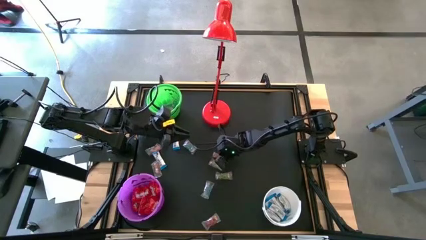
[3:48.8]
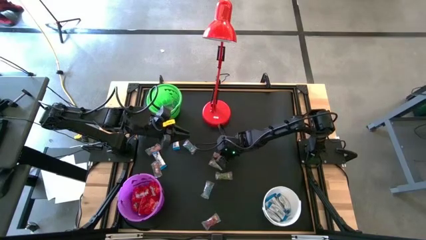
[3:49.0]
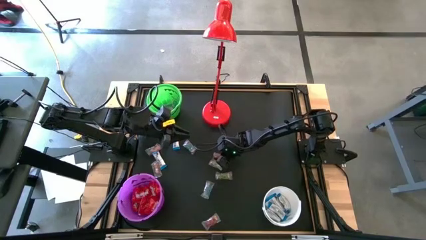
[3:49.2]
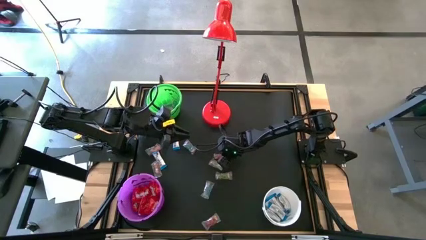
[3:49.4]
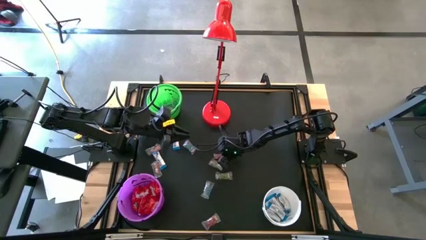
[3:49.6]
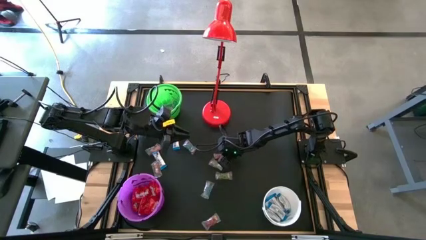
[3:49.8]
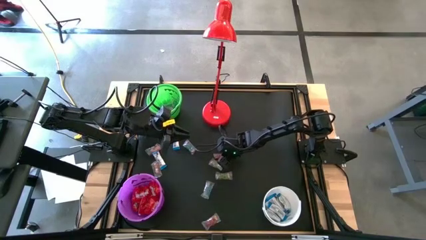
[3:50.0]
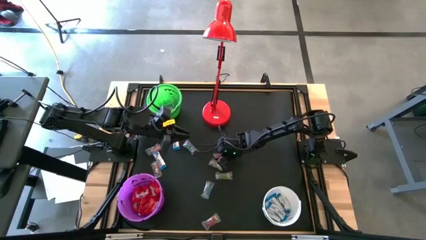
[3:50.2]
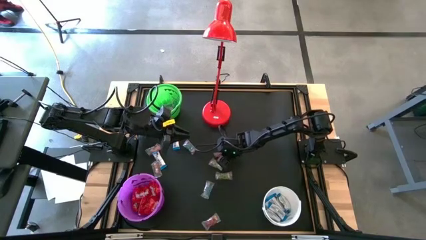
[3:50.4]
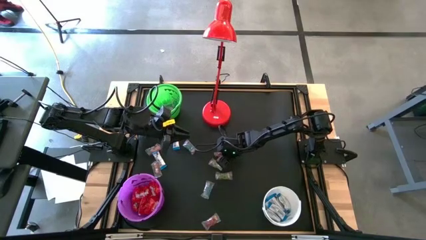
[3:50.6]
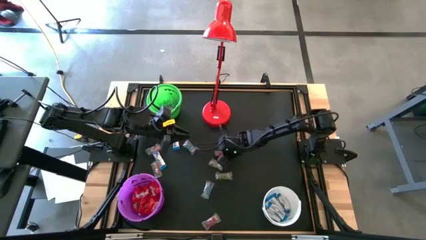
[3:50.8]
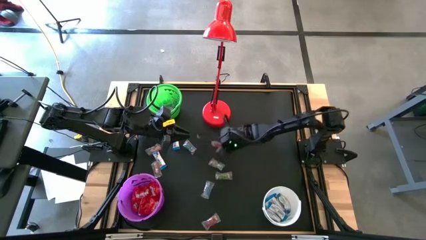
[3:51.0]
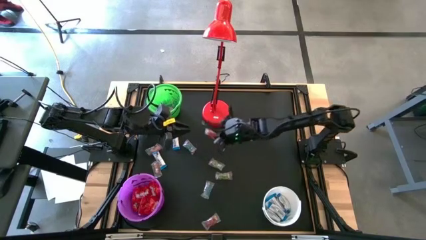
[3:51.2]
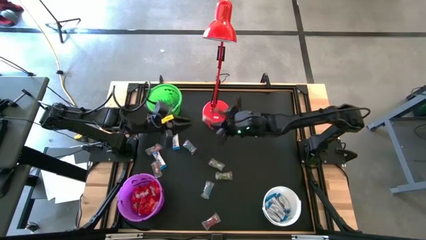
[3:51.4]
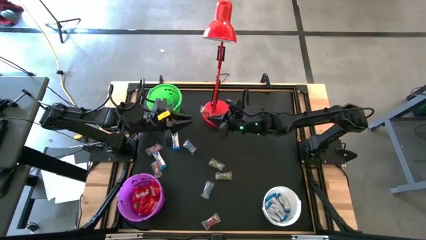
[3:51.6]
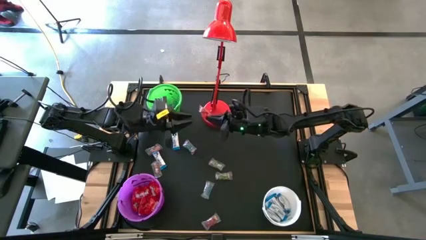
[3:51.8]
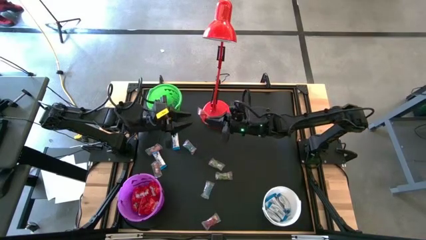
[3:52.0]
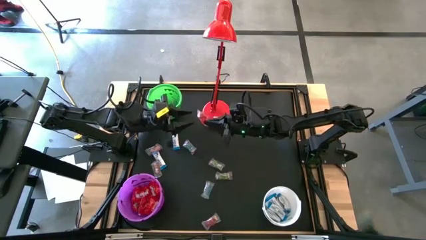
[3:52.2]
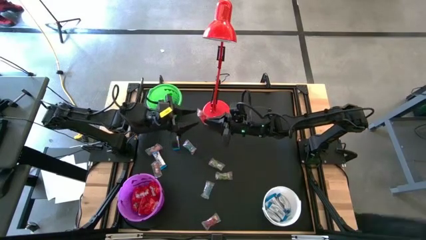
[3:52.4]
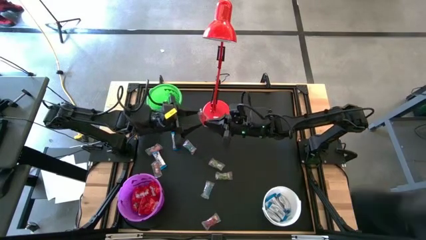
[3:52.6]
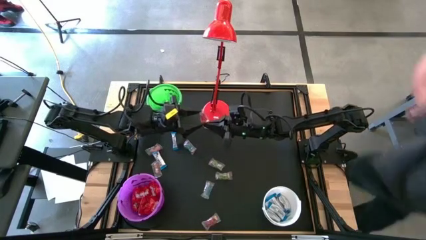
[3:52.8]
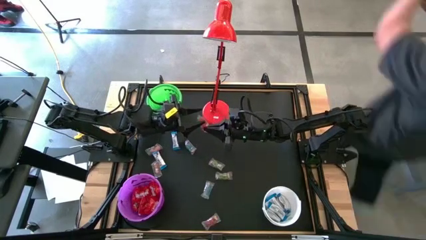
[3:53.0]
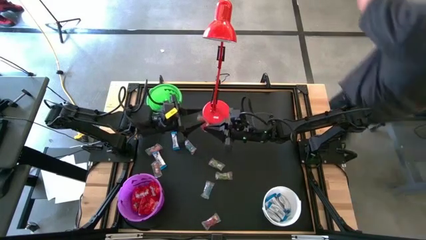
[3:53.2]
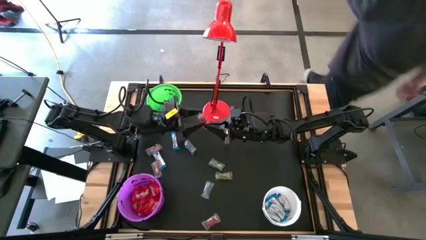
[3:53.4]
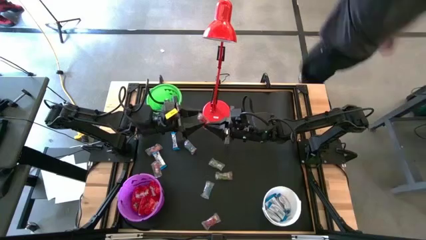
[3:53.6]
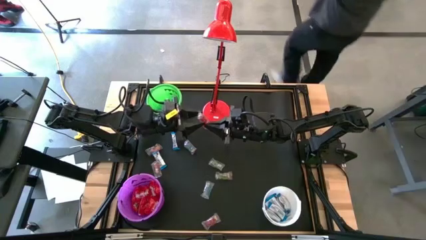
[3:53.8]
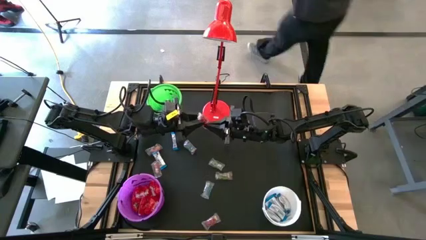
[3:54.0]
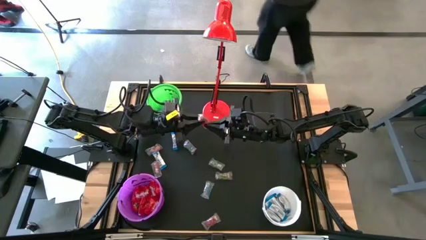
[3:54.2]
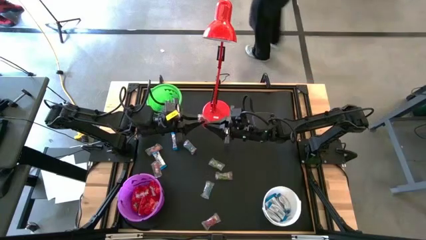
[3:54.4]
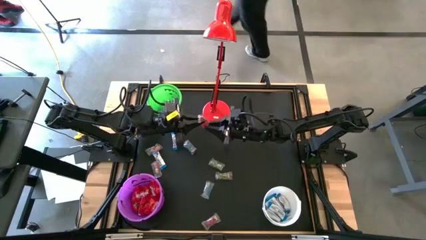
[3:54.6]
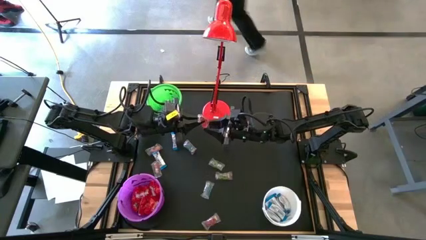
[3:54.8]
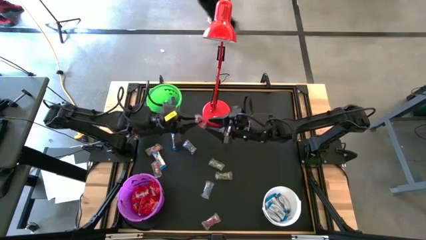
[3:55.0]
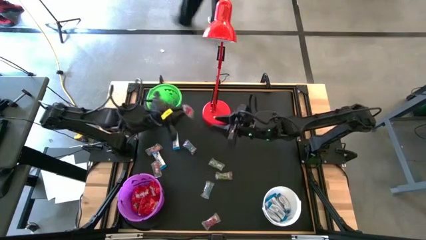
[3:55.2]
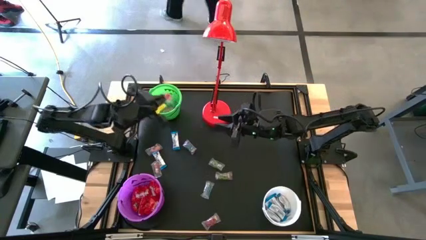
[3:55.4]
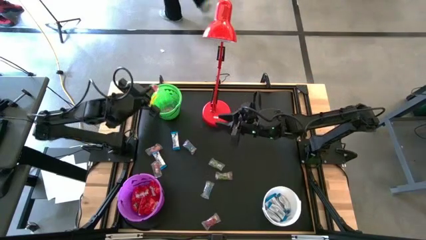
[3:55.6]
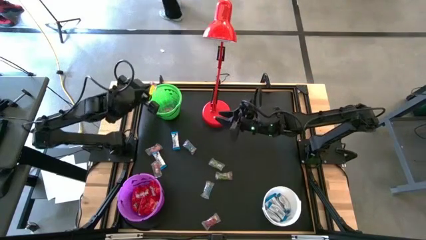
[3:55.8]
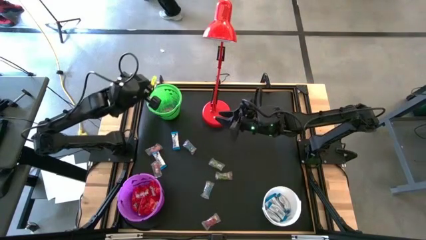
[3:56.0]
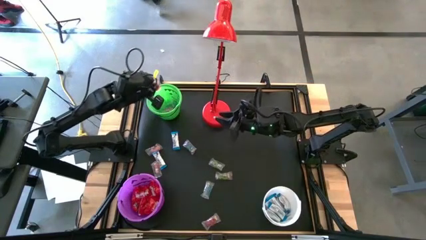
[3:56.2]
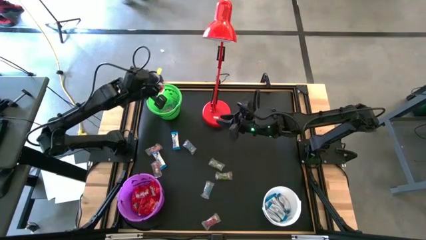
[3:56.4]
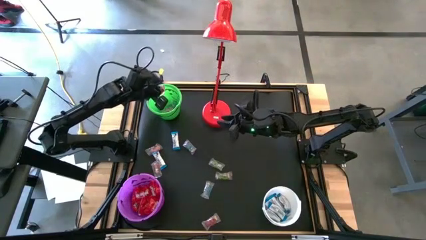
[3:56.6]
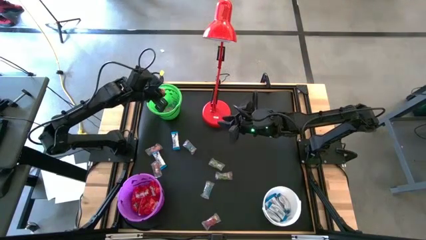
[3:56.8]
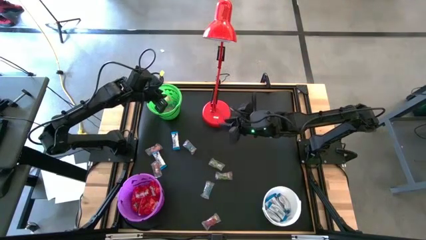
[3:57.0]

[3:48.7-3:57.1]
Task: Sort candy
Put the red gummy into the green bucket

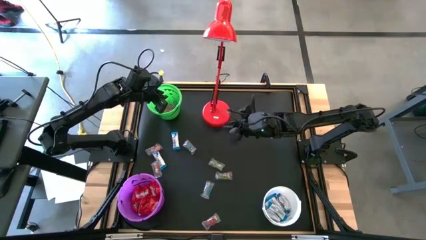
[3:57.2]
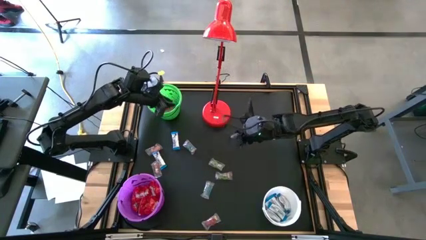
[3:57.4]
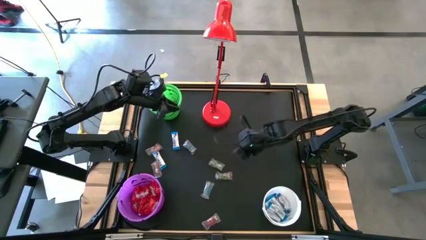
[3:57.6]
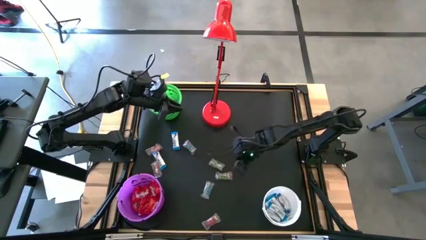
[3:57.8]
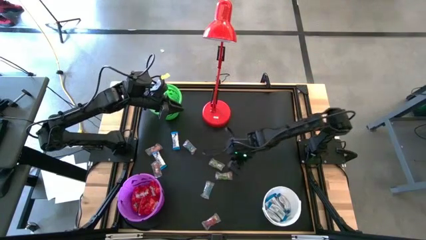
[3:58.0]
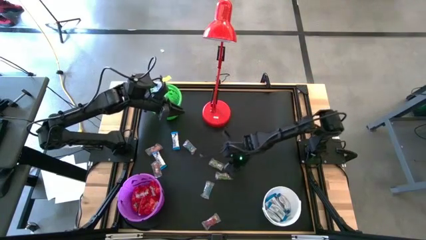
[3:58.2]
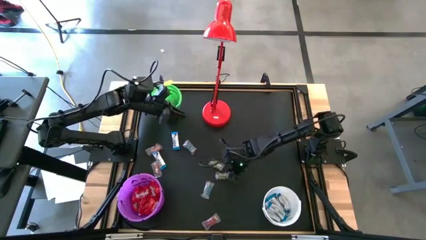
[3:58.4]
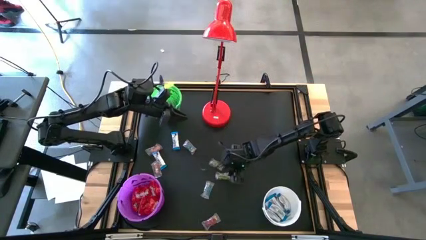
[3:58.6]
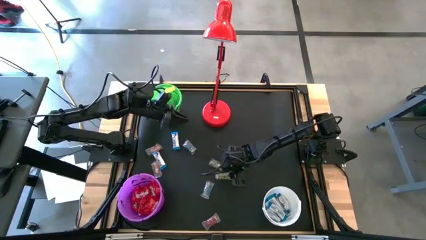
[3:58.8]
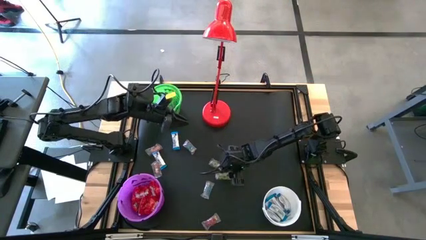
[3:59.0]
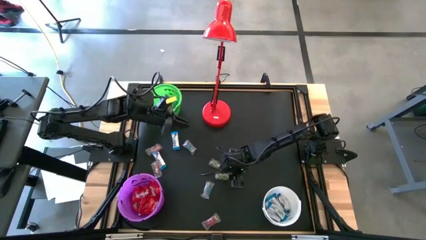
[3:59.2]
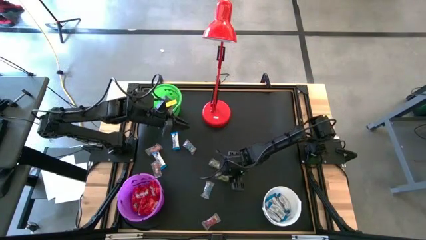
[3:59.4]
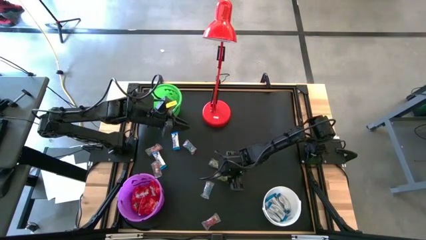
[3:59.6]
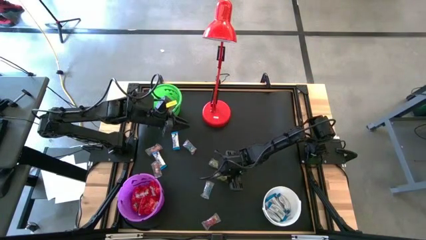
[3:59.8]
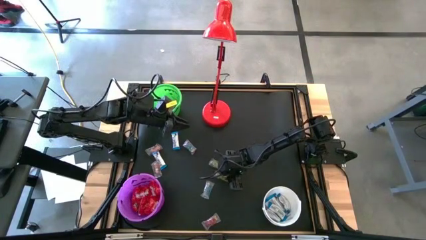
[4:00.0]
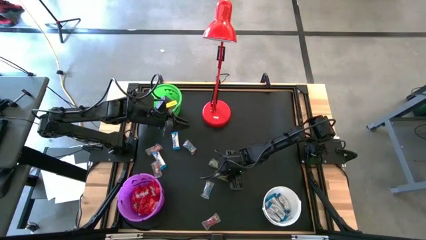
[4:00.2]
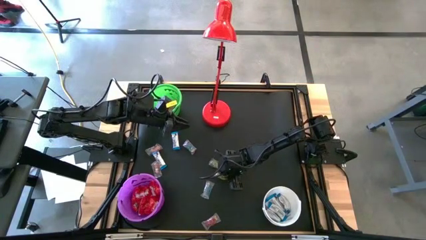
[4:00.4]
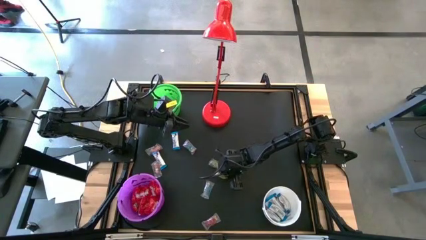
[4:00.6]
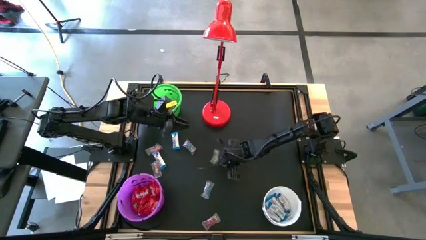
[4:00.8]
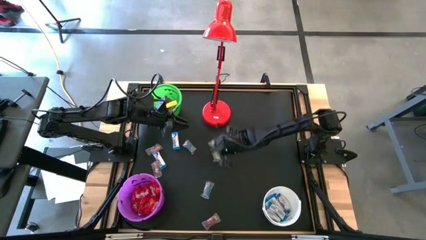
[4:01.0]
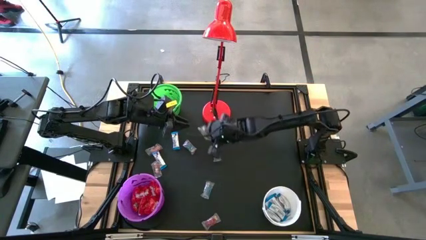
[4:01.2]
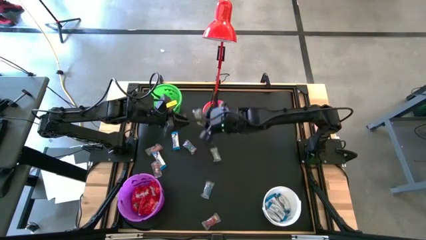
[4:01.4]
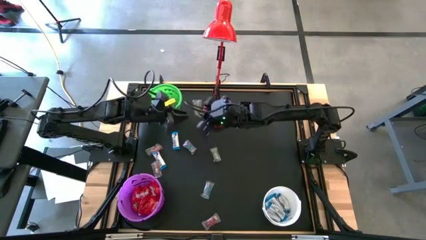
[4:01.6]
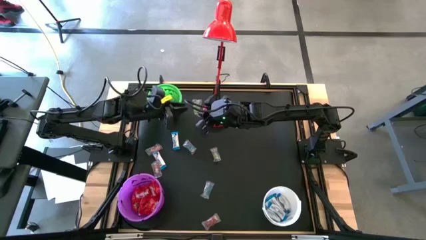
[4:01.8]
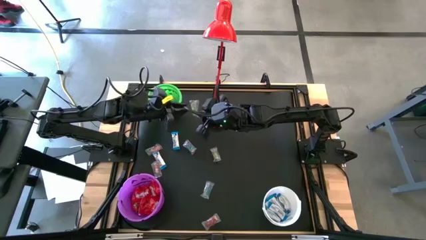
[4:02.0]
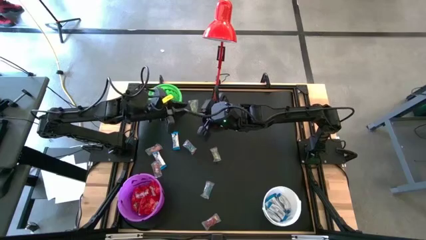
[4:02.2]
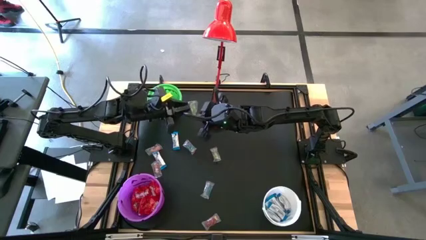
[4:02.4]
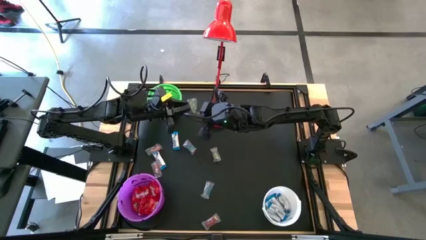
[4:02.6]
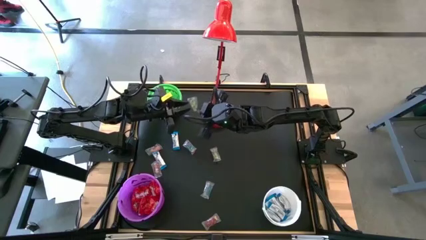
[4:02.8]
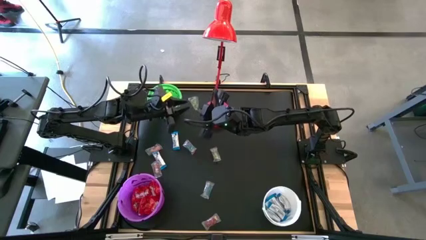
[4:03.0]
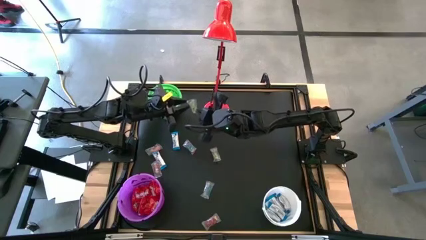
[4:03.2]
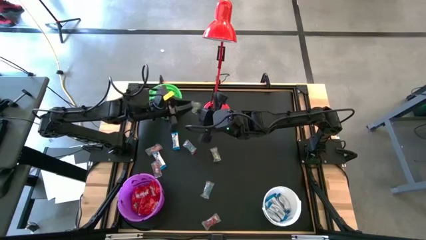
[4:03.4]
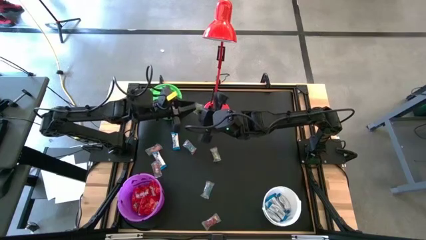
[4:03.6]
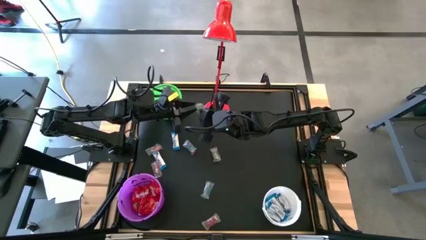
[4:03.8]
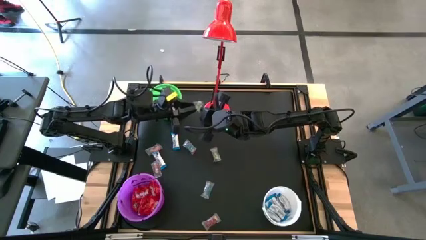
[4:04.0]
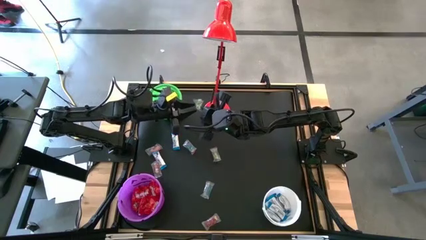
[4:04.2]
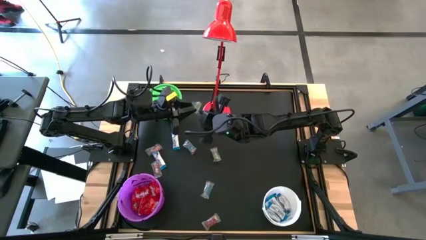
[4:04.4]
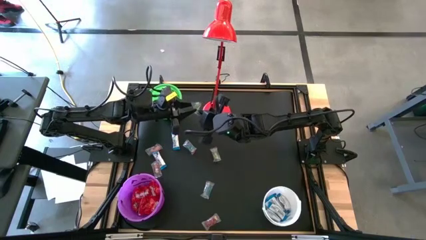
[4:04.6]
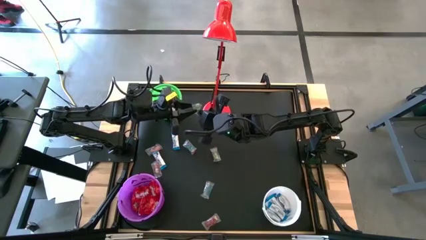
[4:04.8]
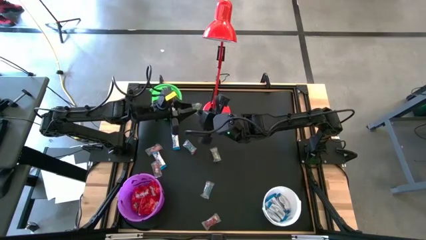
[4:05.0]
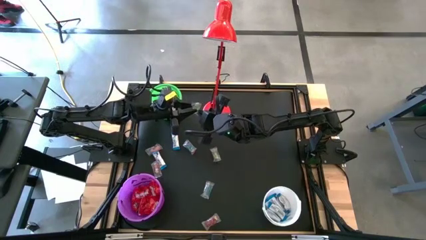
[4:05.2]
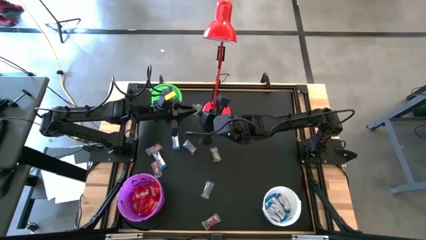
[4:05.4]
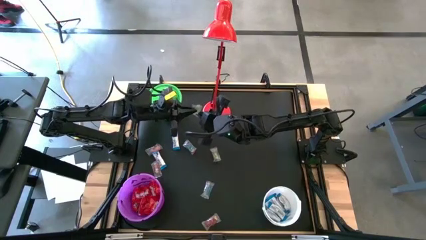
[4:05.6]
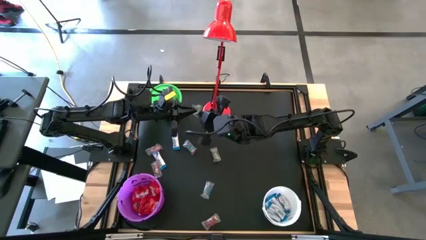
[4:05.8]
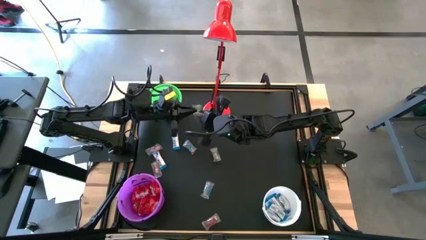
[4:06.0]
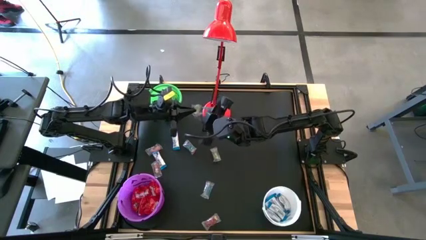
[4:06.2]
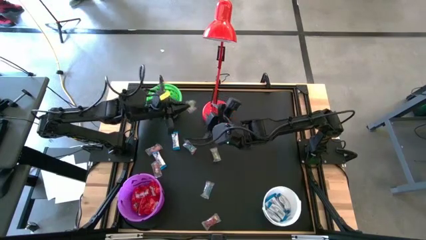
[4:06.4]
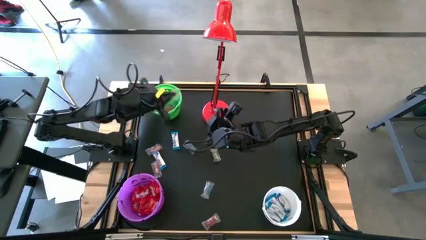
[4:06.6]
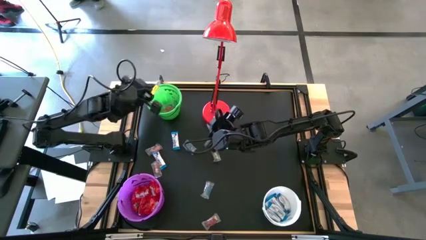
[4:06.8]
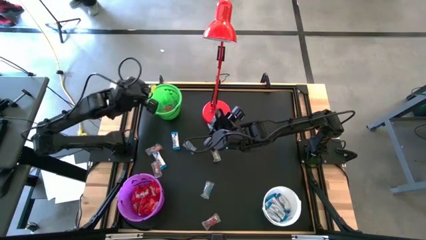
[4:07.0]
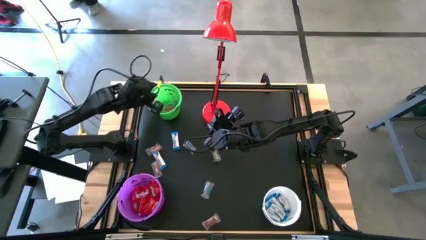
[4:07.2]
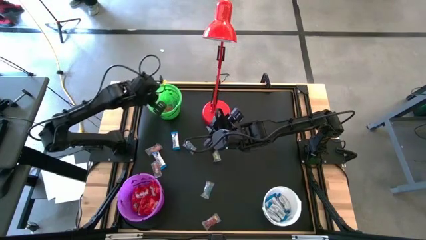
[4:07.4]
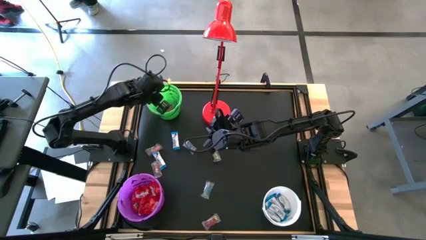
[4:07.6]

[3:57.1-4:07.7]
Put the green gummy into the green bucket
